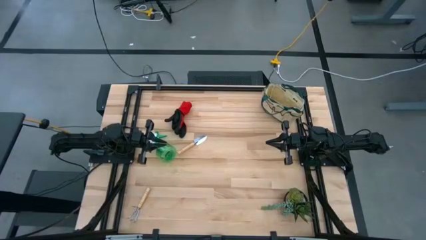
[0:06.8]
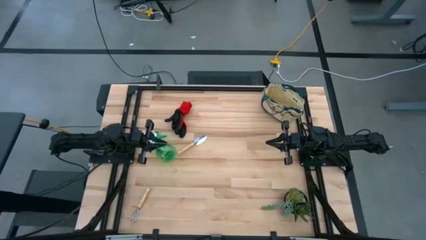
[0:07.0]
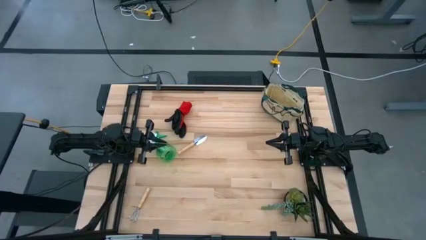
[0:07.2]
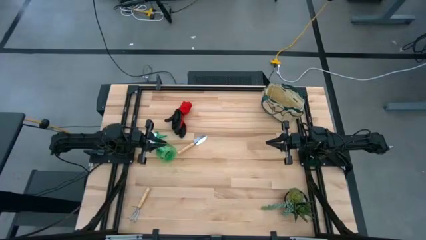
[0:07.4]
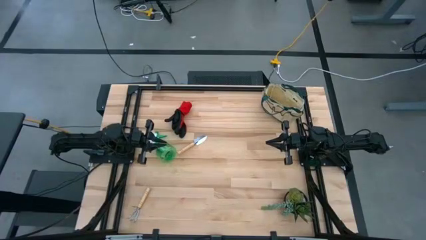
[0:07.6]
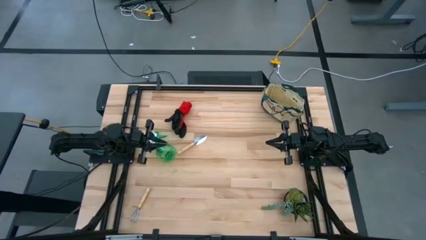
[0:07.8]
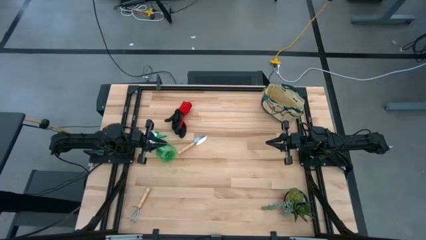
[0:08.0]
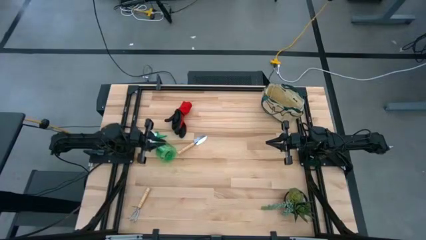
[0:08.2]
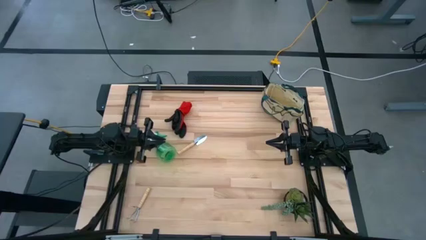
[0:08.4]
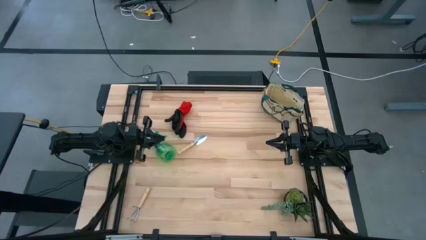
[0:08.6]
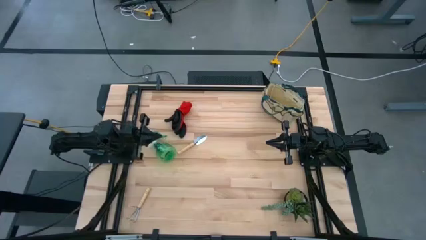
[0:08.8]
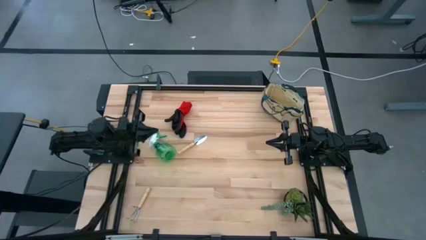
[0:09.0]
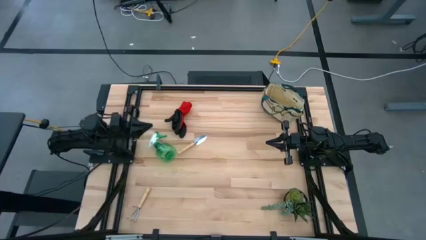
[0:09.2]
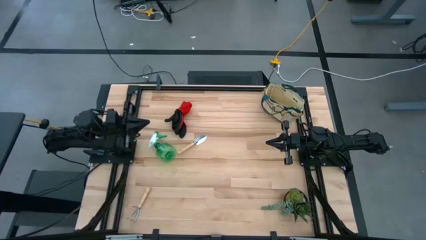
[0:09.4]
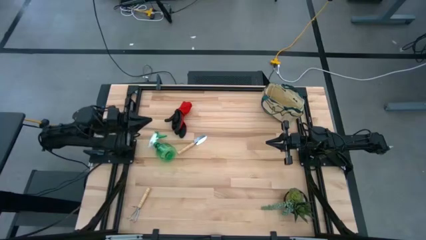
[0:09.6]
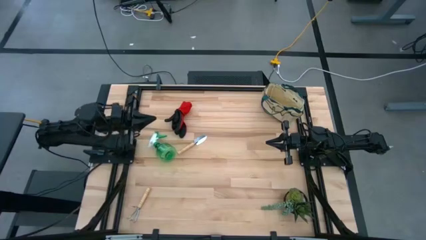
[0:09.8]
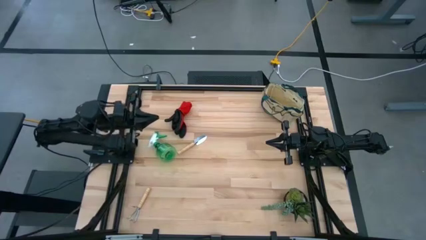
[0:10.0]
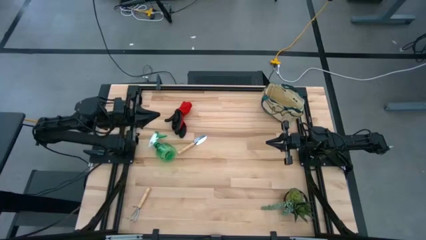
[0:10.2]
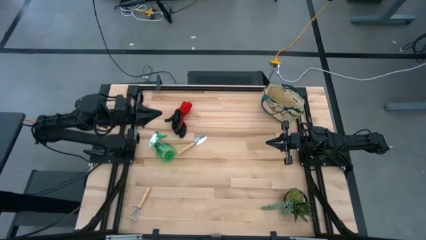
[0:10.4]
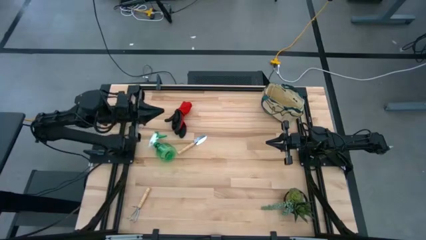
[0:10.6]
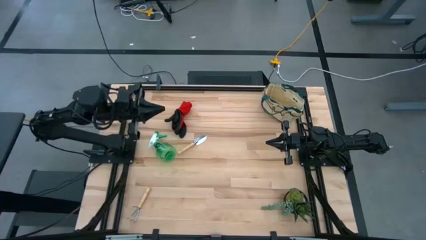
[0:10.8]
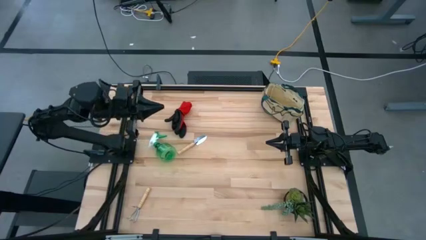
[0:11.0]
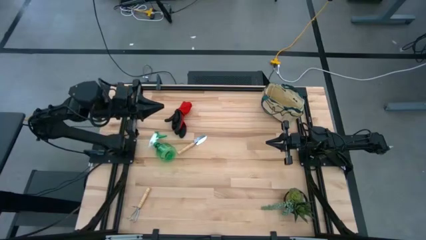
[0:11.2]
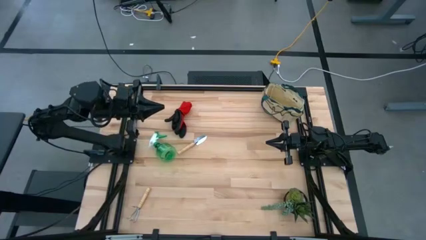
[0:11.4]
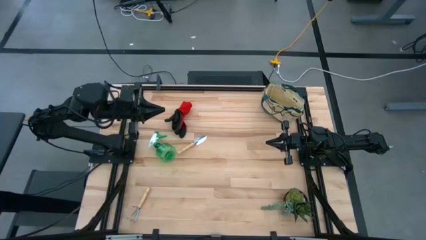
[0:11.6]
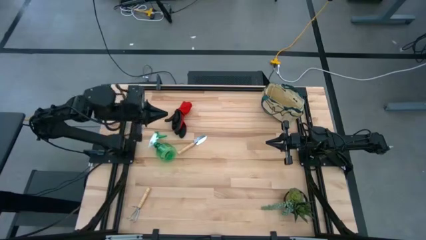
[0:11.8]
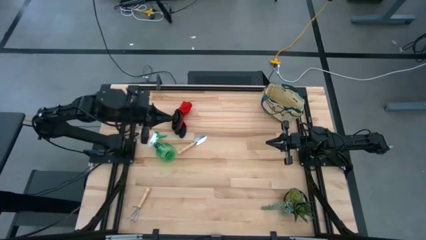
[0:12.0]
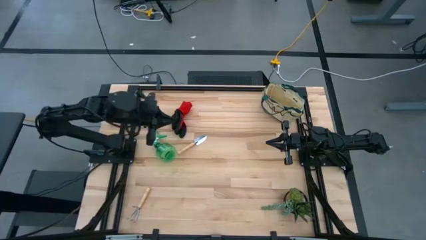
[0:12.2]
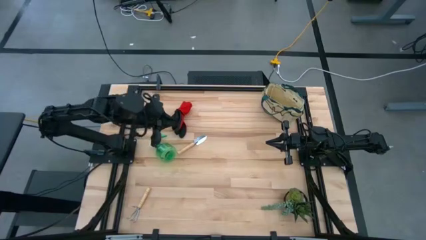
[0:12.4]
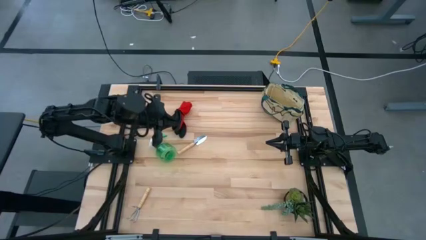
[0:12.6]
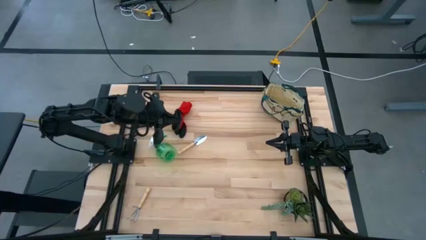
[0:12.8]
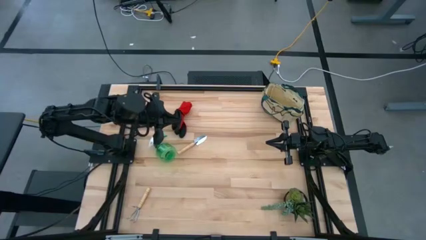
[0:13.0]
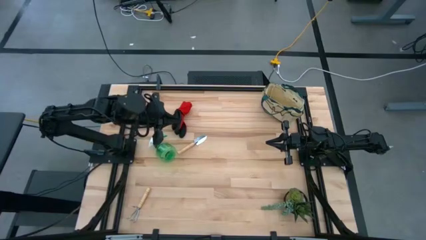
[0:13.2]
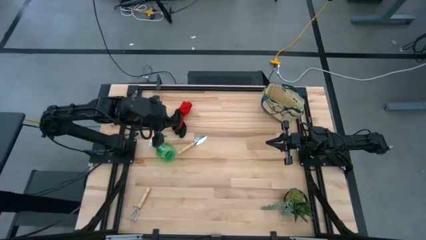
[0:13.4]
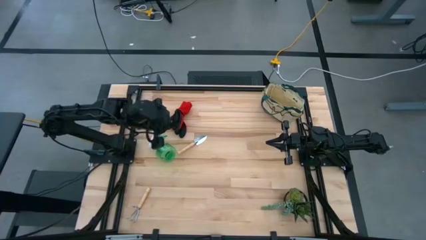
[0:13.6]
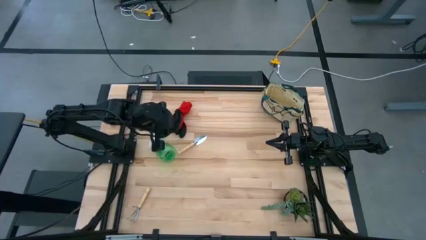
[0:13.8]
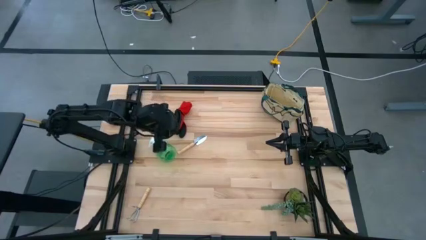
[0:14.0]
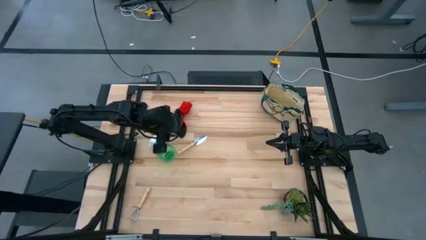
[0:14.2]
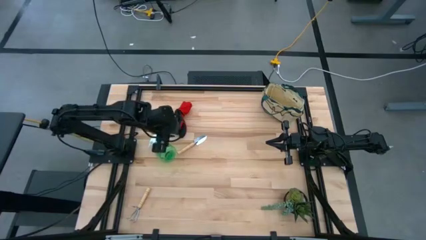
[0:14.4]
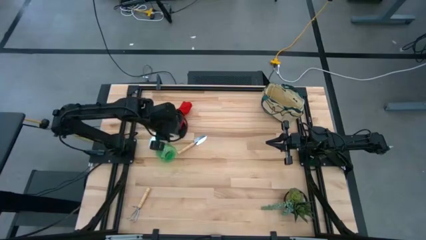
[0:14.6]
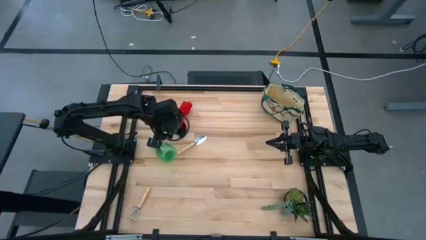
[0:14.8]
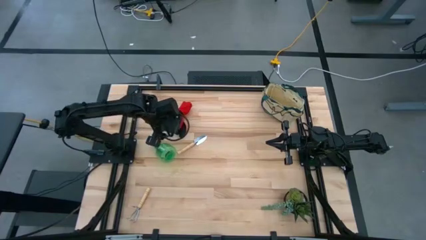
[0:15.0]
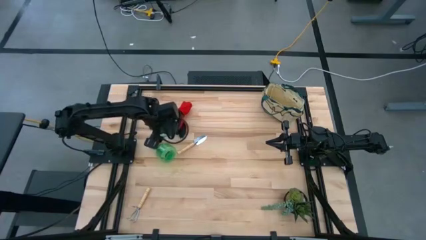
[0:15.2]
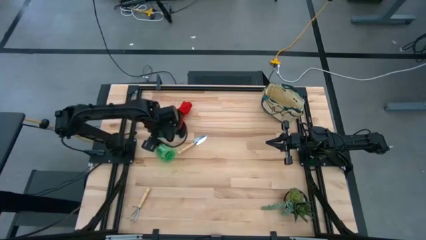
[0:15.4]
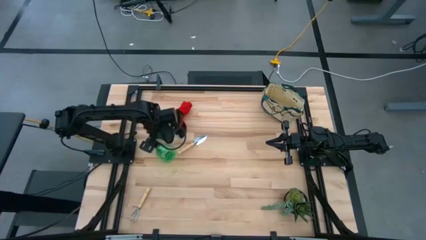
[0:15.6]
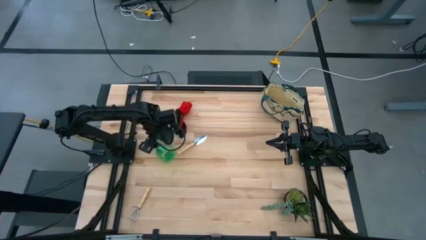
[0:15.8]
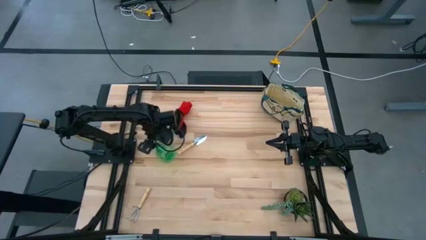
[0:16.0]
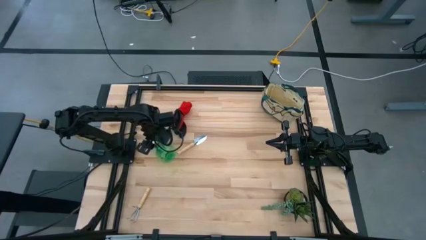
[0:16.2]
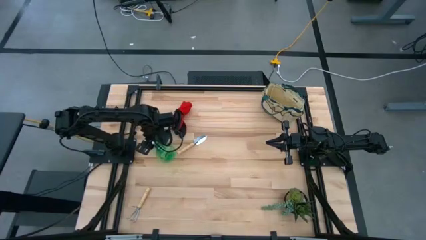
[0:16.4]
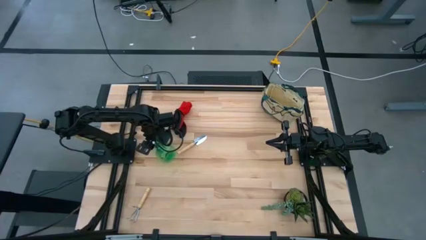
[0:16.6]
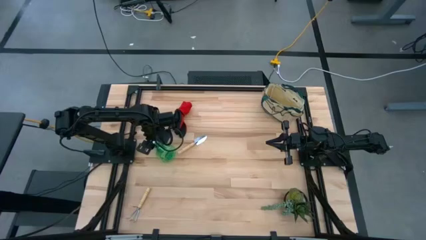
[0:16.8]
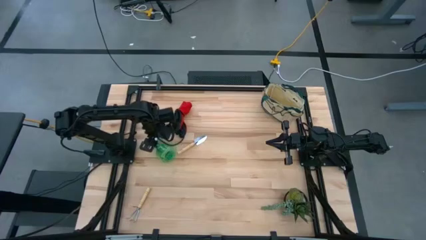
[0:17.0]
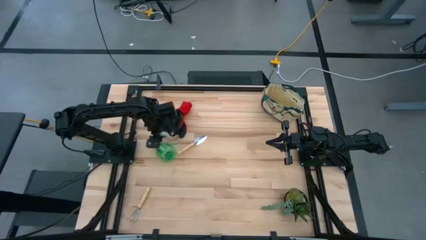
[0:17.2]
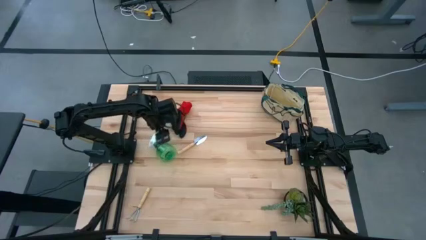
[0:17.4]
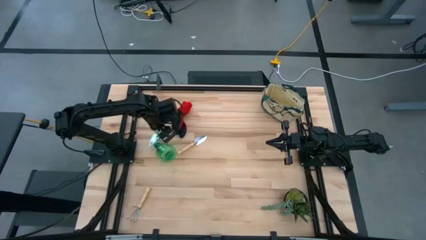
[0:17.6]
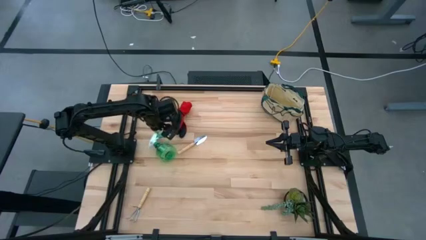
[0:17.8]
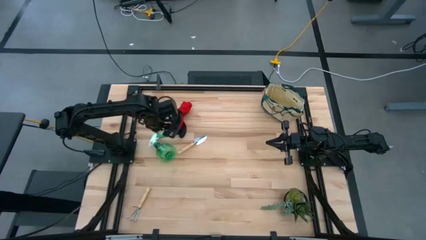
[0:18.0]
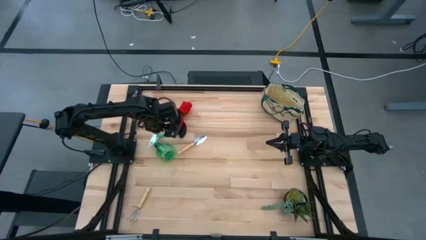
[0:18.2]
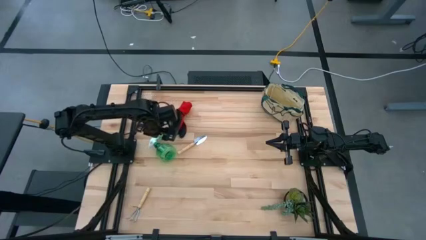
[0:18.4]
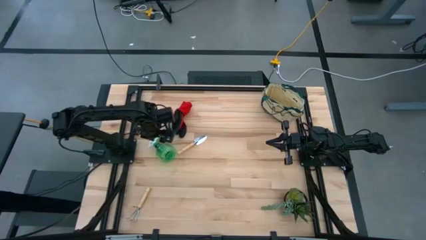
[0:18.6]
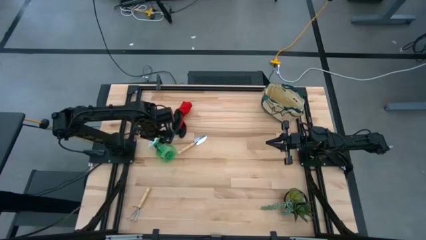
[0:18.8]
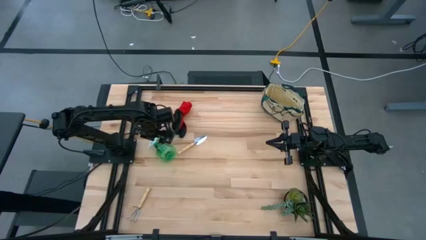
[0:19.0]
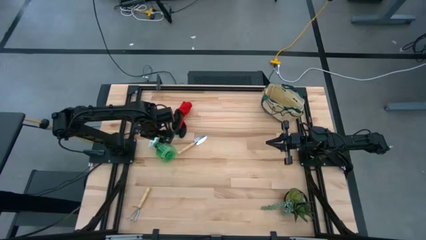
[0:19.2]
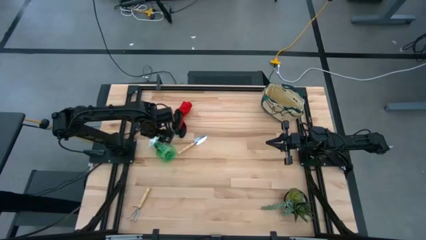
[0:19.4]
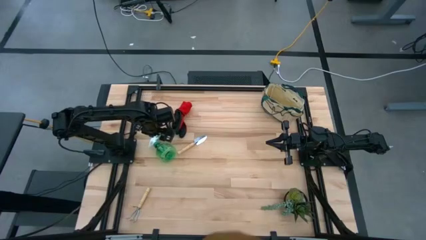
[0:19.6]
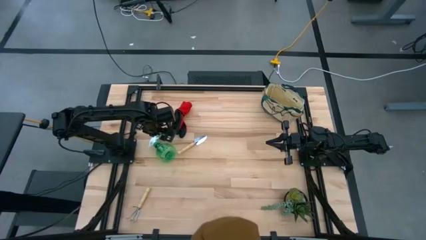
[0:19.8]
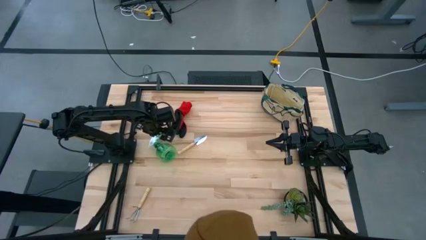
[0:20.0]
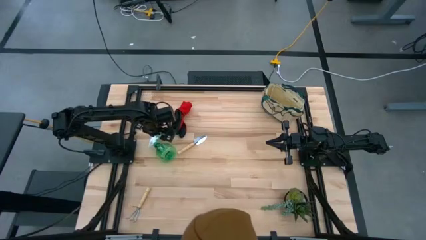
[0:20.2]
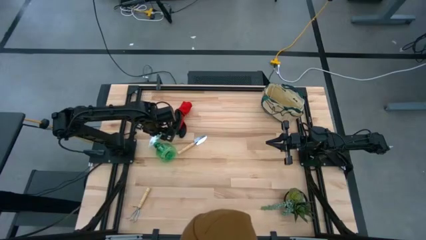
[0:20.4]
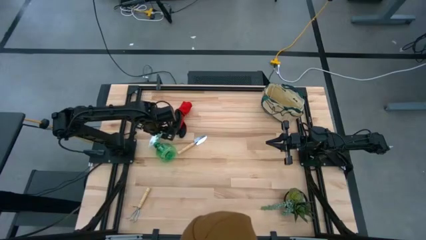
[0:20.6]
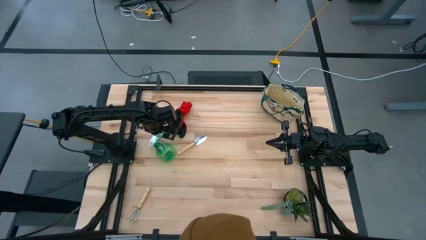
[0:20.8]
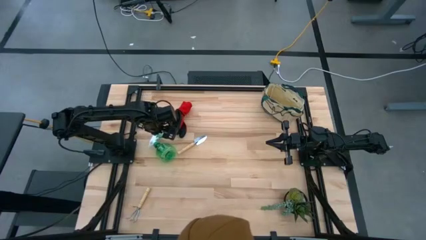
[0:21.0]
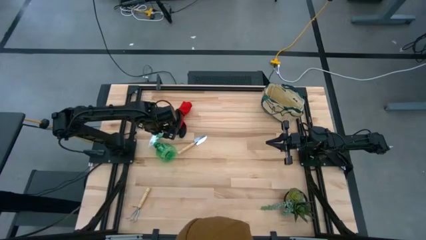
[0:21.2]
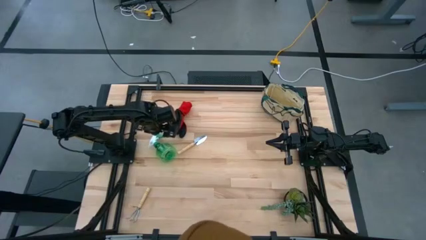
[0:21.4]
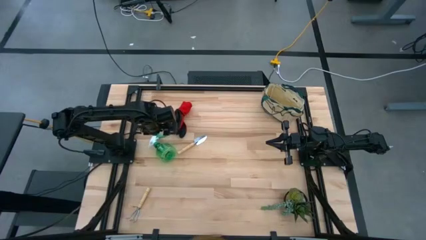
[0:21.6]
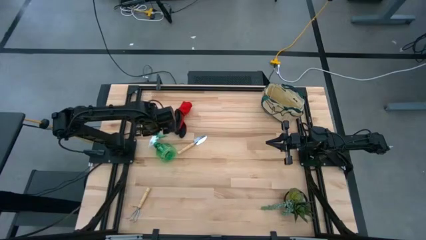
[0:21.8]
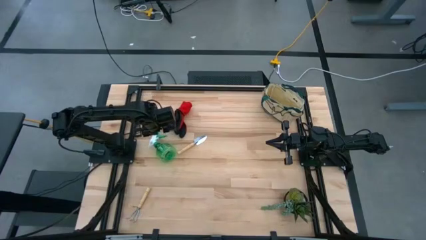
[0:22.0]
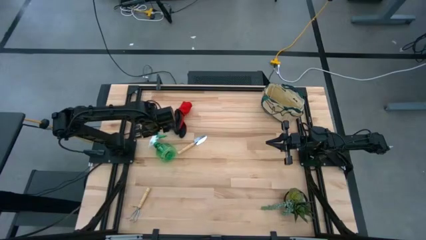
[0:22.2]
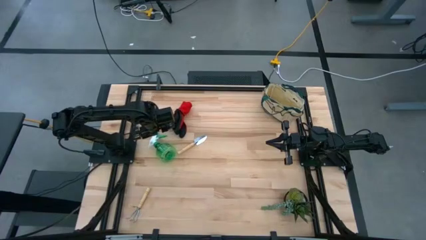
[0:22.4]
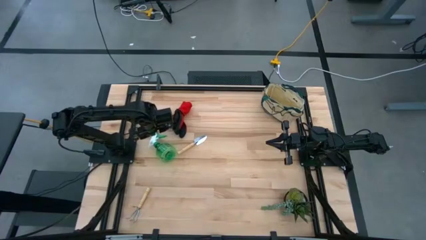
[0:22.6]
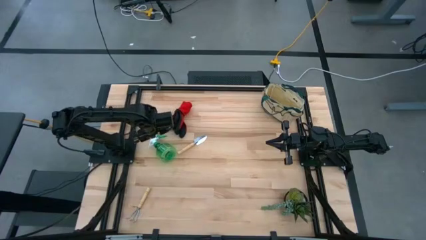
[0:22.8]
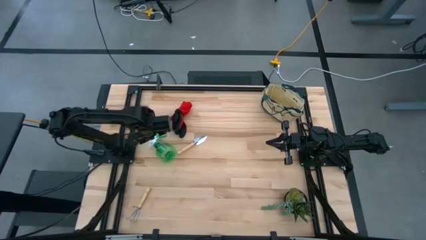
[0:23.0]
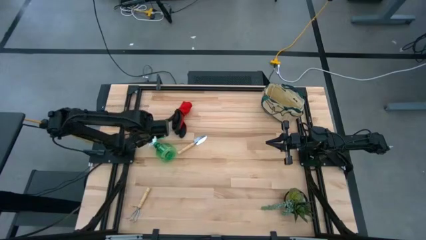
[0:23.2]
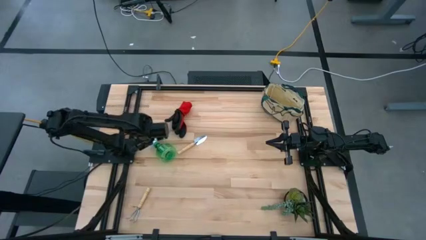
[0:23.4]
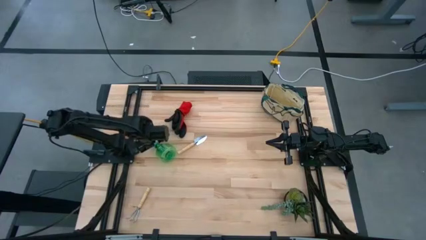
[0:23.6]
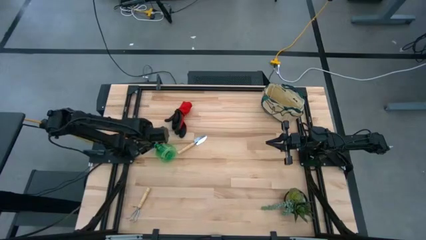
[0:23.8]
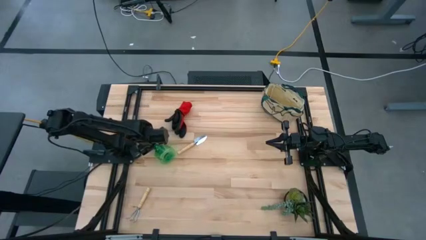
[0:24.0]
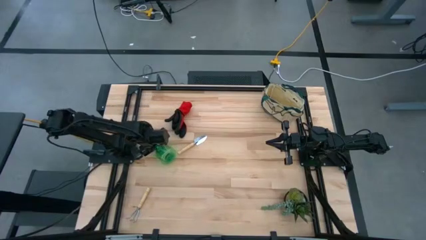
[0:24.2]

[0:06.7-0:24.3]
Task: Pick & Place Garden tools in Gardening bag
Put the green spray bottle into the gardening bag
